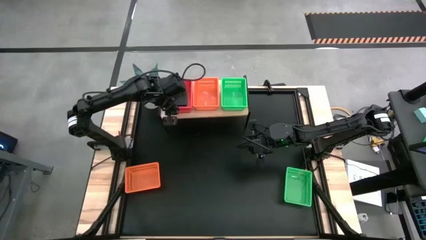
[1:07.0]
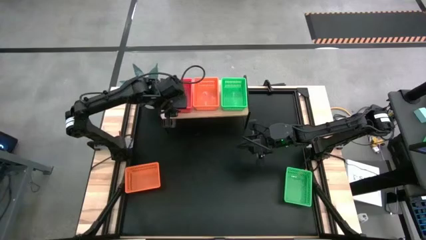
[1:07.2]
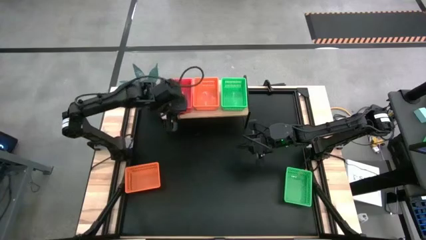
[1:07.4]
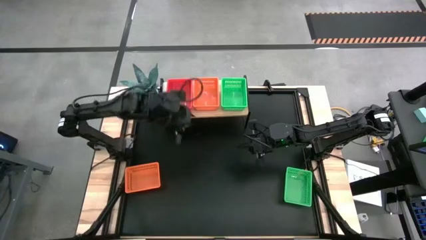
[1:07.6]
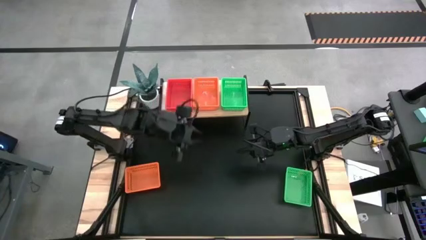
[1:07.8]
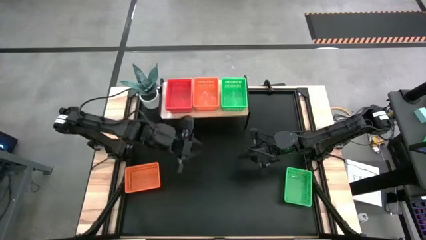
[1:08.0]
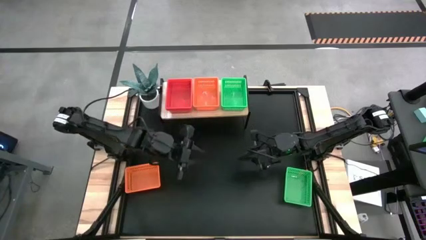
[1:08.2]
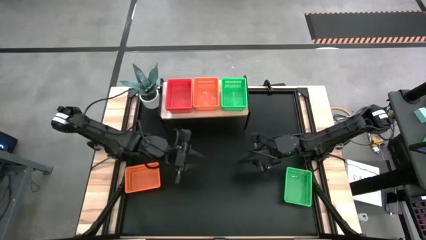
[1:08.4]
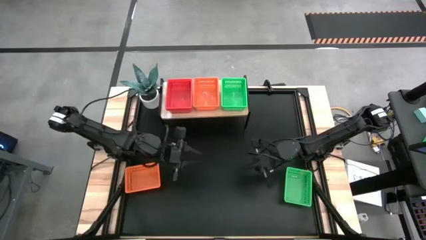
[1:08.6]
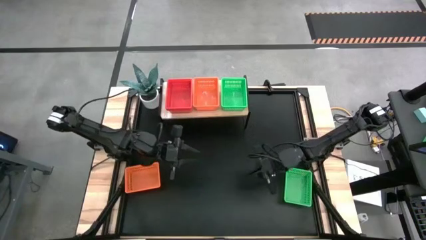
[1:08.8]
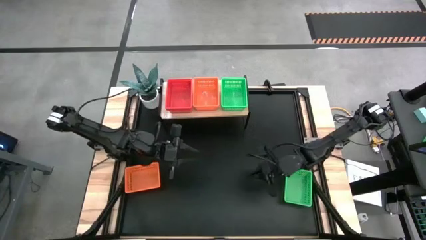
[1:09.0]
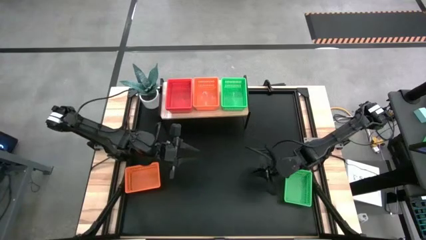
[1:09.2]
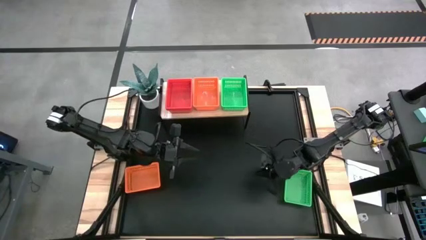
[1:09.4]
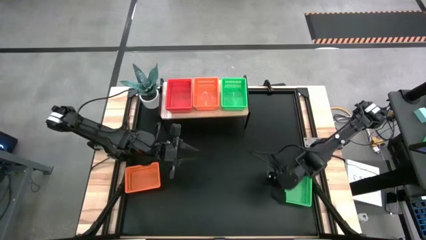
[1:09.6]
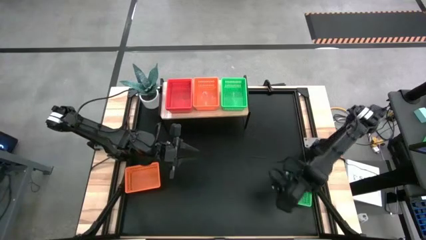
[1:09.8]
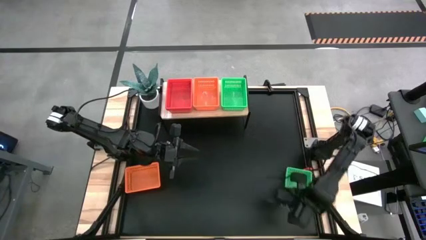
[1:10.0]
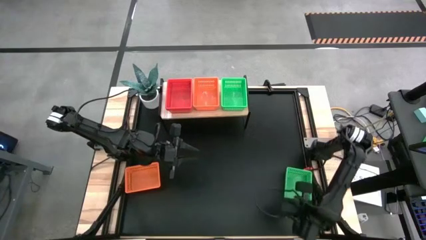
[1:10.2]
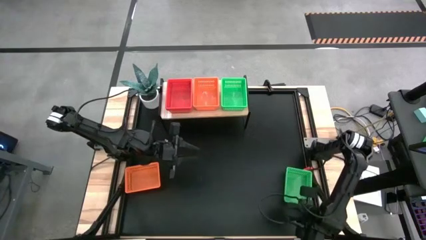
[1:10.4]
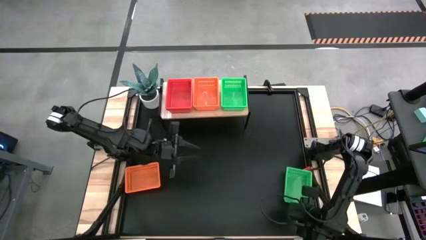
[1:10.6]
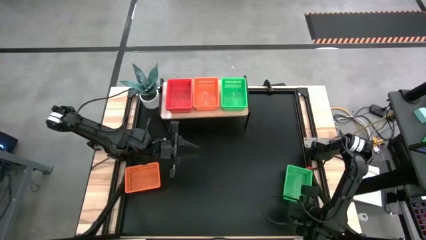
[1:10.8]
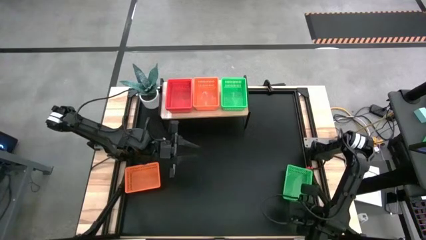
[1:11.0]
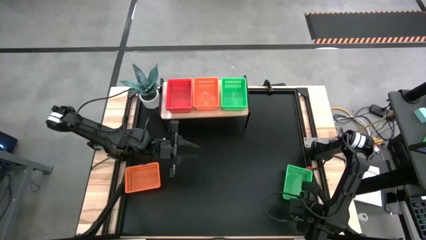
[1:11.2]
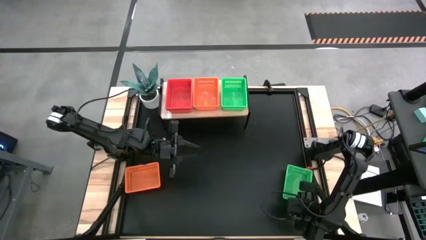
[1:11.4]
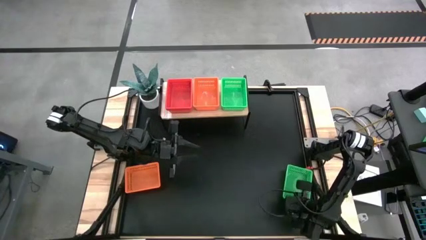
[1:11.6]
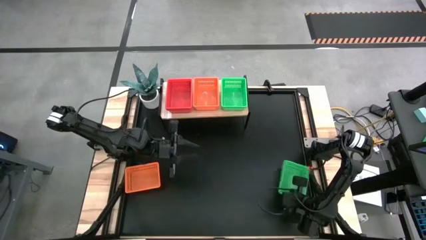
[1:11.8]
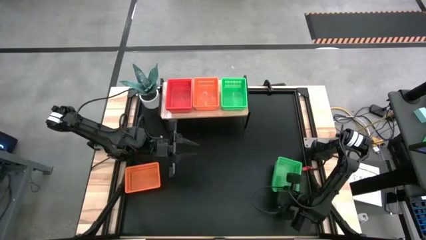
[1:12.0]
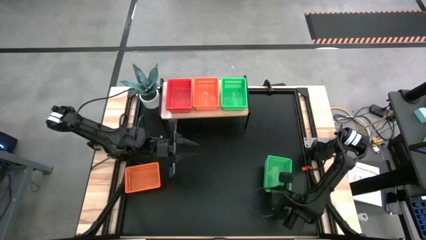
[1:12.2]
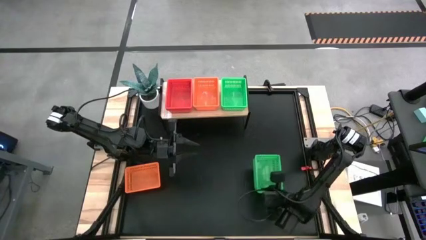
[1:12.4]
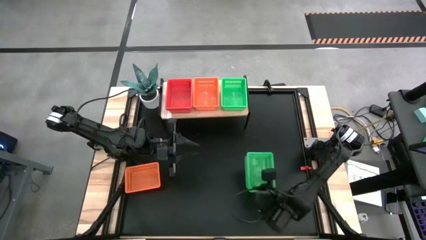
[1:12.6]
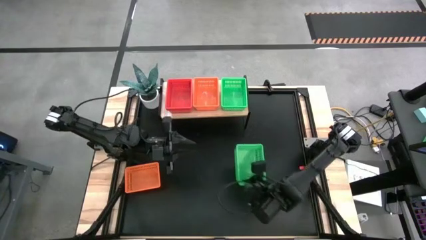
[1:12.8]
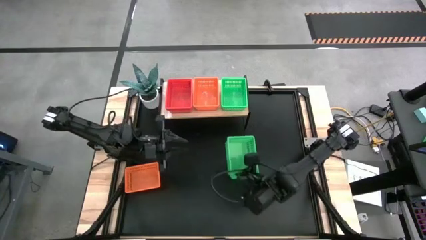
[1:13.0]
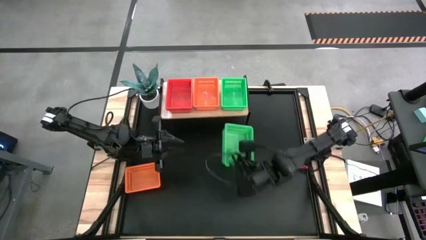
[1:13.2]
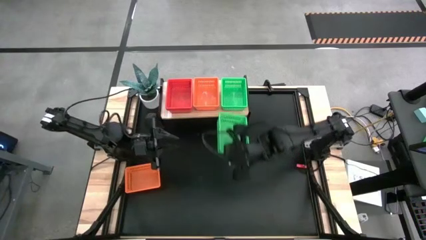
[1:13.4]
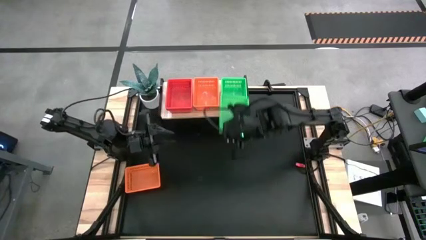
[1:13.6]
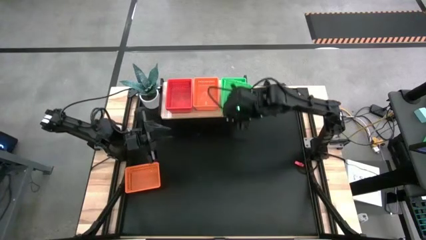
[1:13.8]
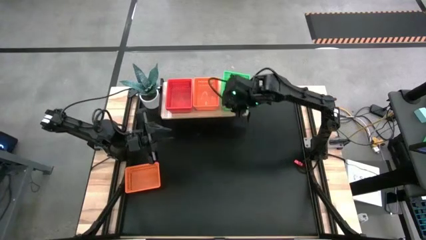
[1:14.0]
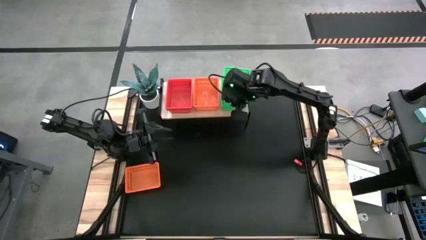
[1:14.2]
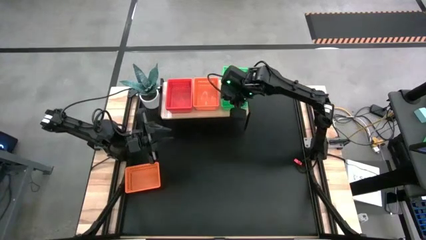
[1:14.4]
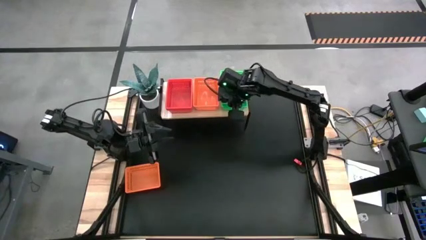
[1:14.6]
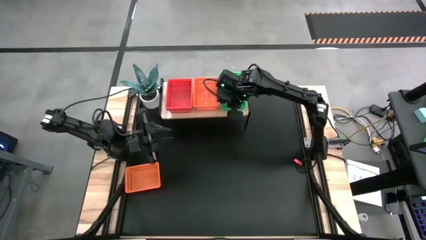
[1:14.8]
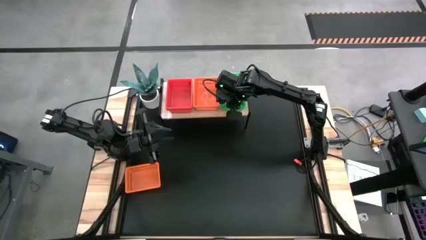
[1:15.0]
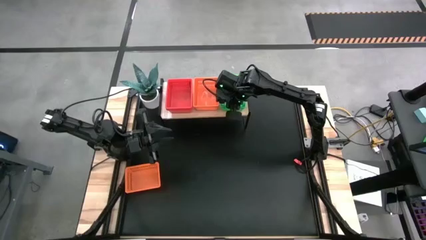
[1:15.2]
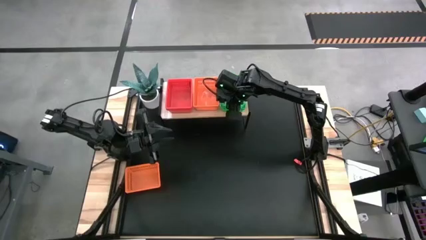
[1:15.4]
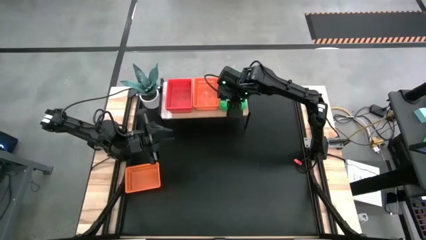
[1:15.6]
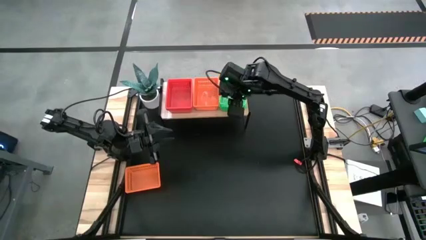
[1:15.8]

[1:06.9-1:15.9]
Stack the green basket on top of the other green basket on the shelf

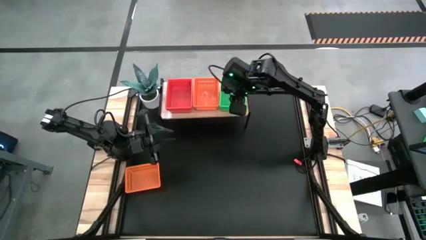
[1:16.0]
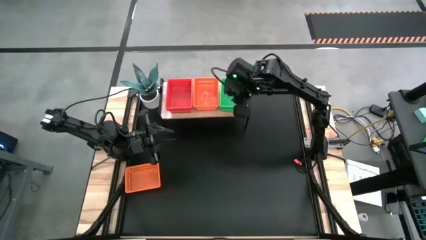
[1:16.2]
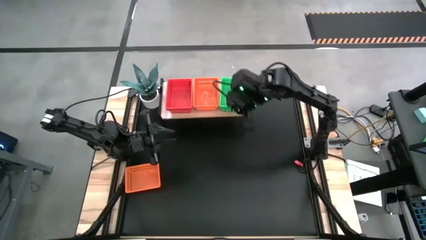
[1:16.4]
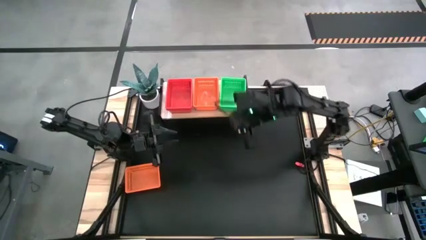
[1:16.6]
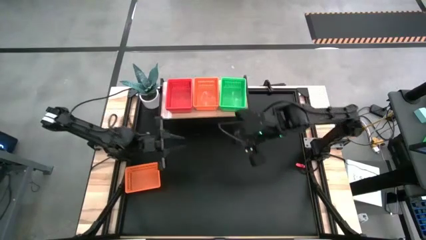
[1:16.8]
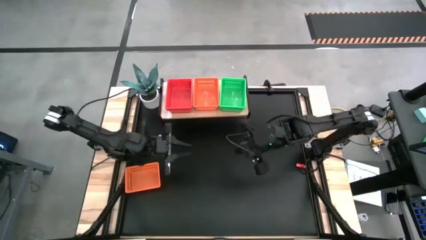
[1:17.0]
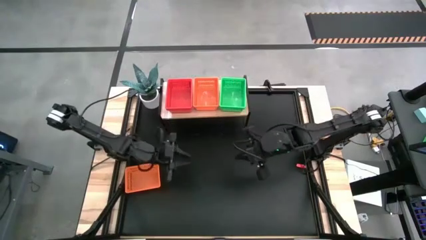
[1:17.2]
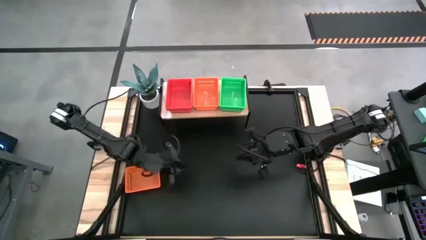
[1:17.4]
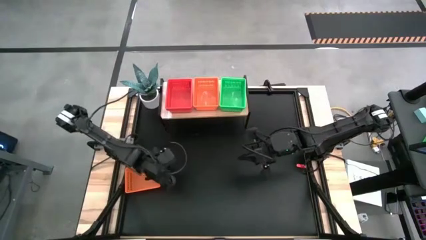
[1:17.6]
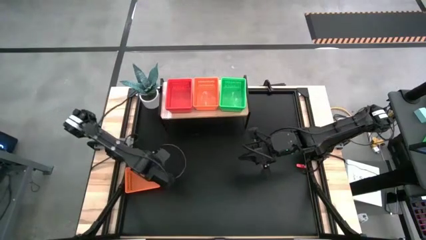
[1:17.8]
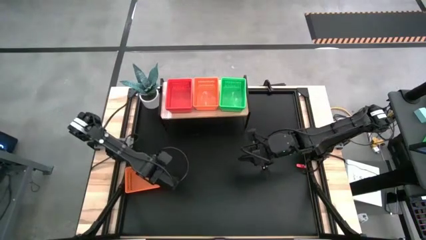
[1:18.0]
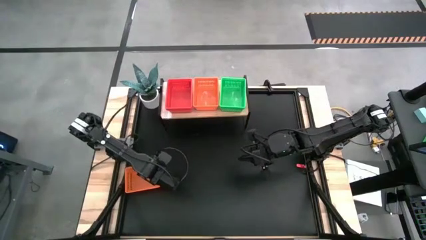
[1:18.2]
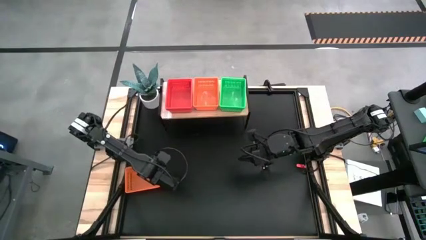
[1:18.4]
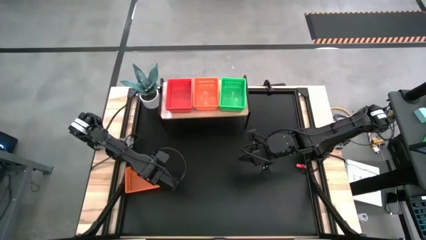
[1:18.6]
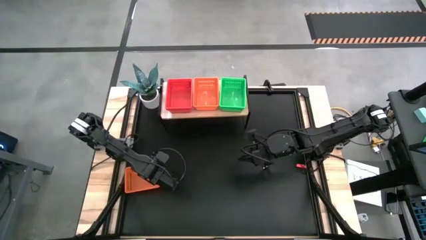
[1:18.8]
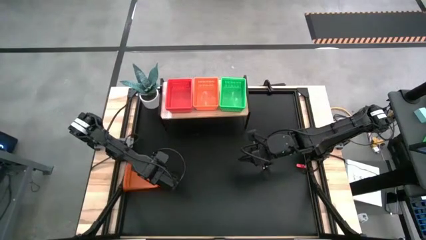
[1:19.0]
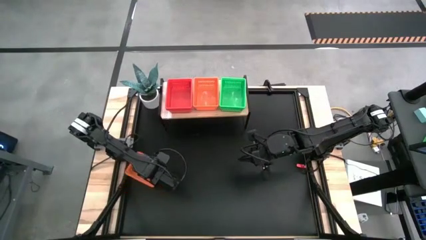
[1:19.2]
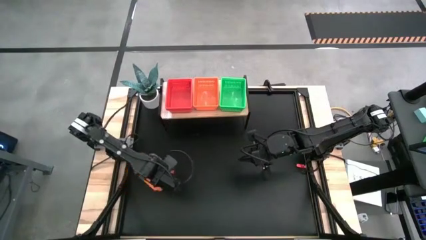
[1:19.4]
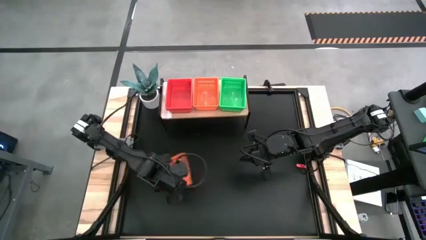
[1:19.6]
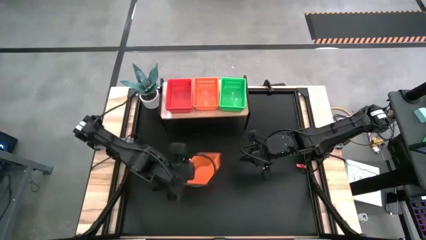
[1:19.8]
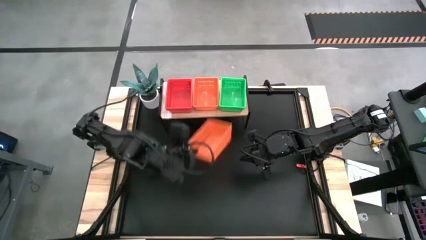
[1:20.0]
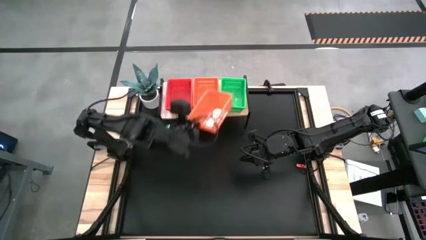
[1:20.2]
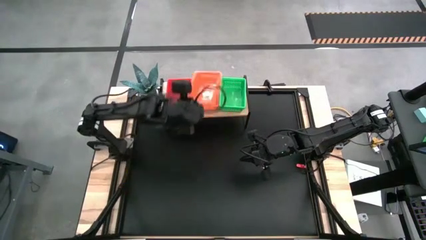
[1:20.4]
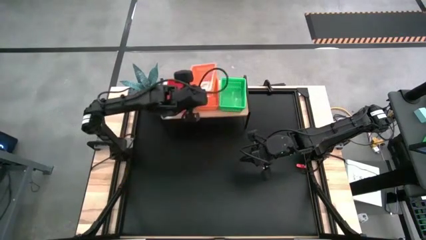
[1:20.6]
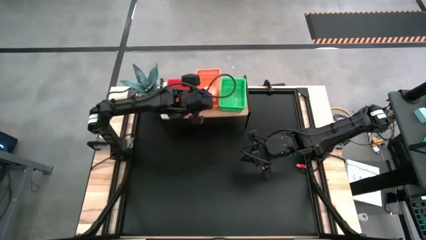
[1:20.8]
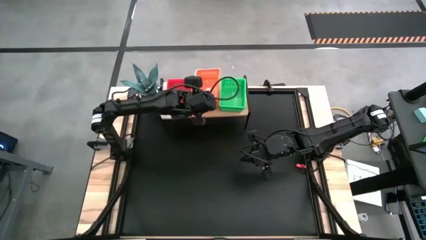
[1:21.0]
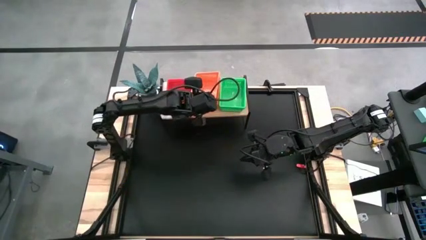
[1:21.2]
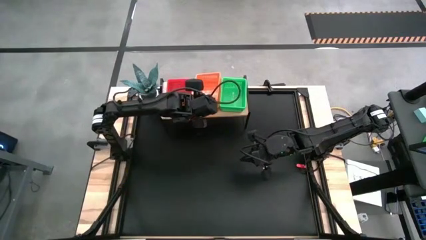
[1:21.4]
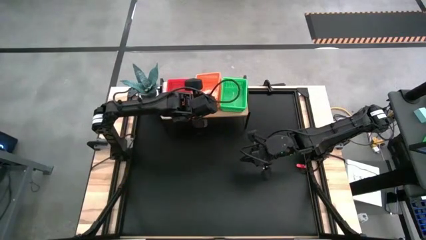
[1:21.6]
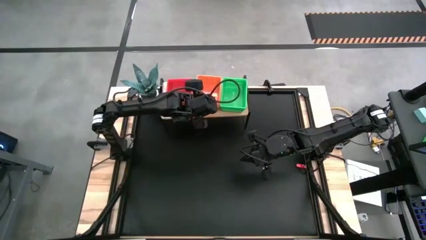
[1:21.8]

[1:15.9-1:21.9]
Stack the orange basket on top of the other orange basket on the shelf
